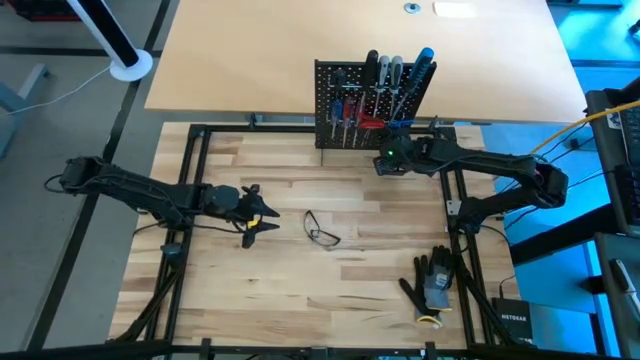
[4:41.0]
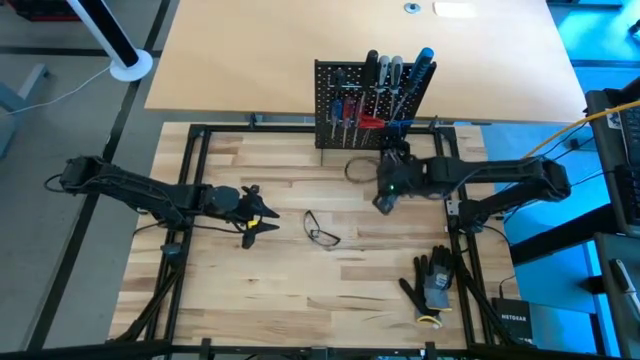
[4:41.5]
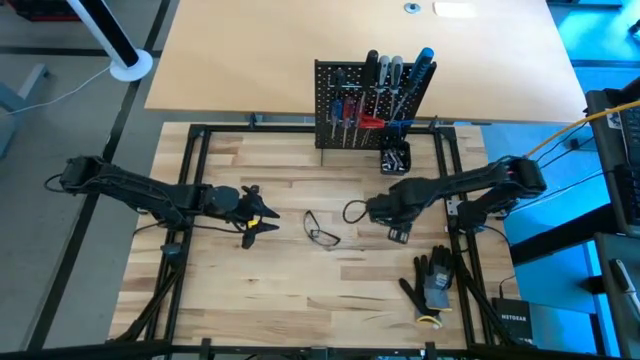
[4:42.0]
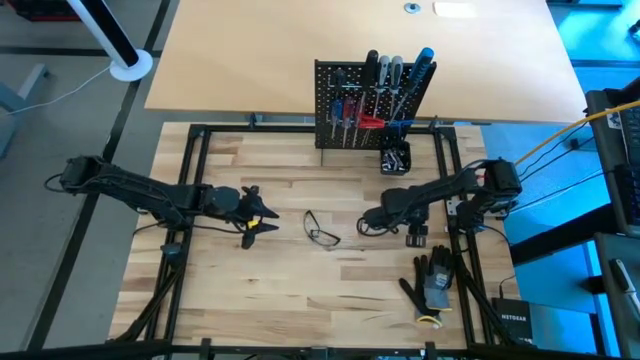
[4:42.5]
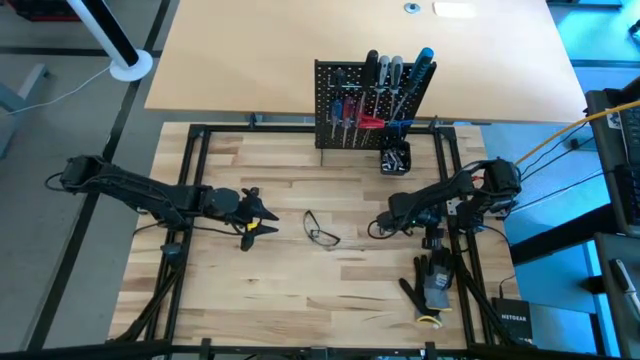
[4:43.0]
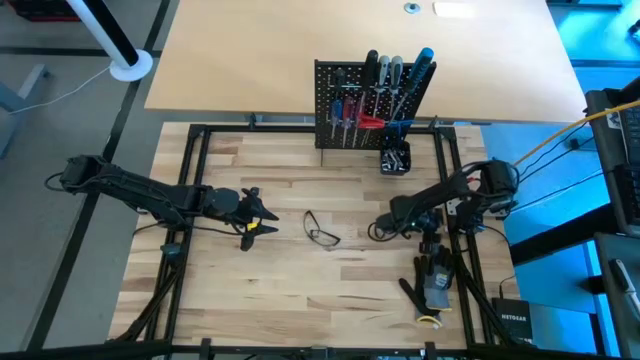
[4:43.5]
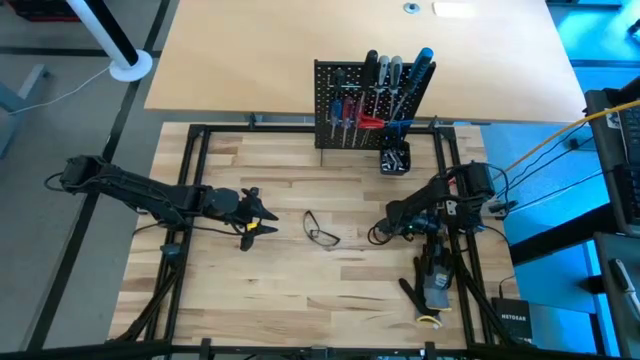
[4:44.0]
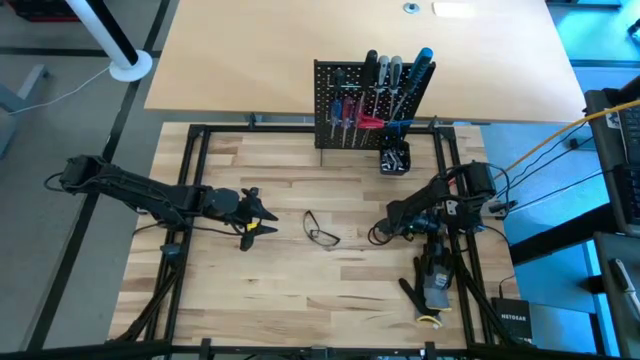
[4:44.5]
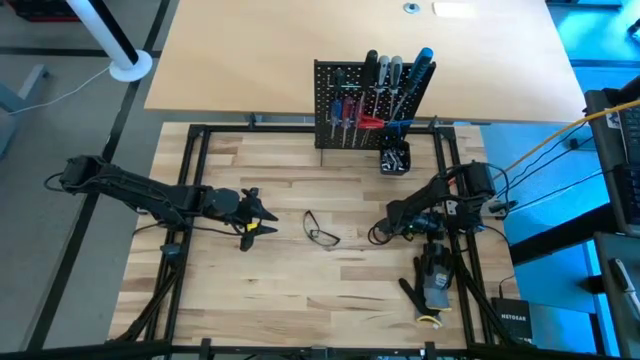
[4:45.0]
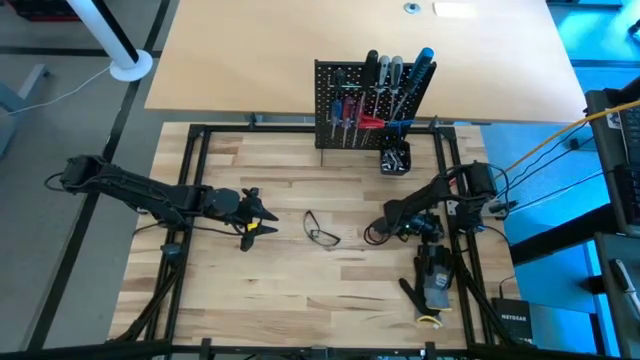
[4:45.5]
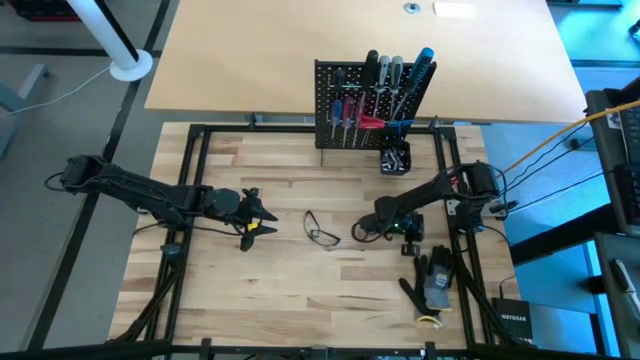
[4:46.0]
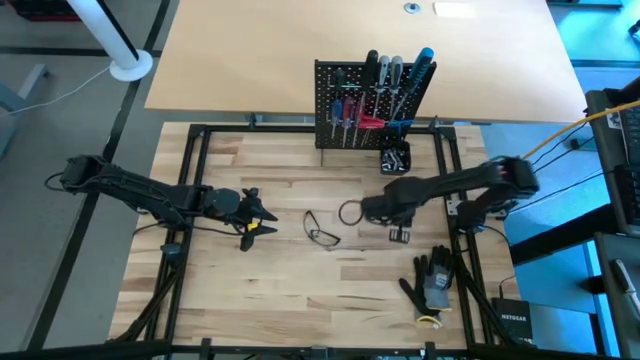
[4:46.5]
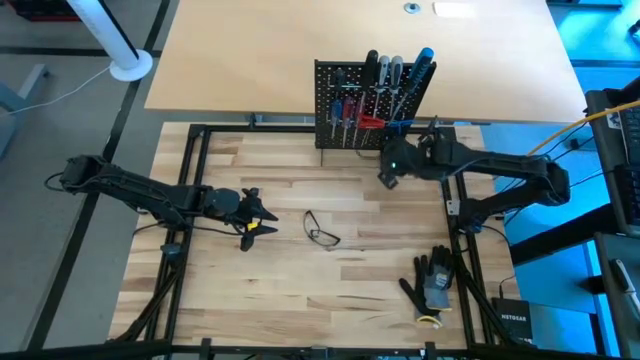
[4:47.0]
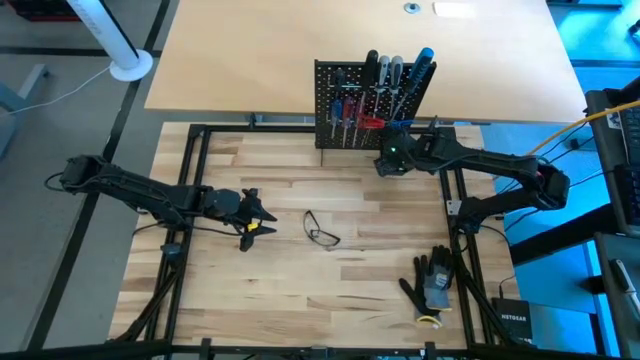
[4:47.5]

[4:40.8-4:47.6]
Task: Hang tools onto peg board
Put the silver socket in the black bin on the peg board

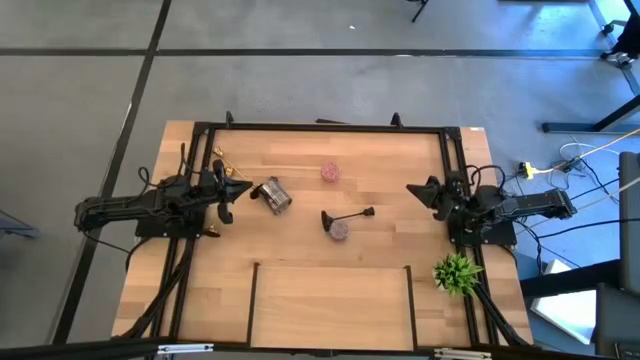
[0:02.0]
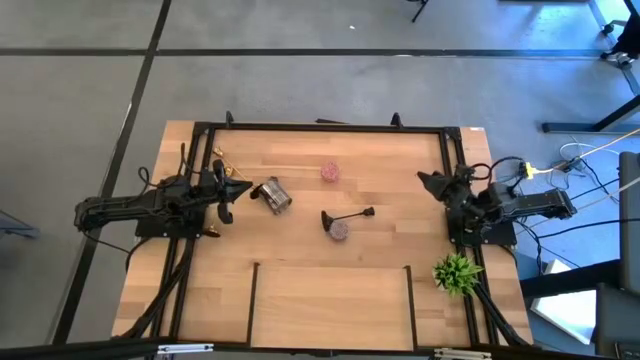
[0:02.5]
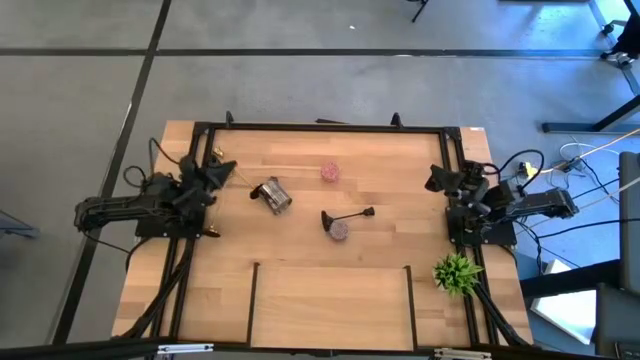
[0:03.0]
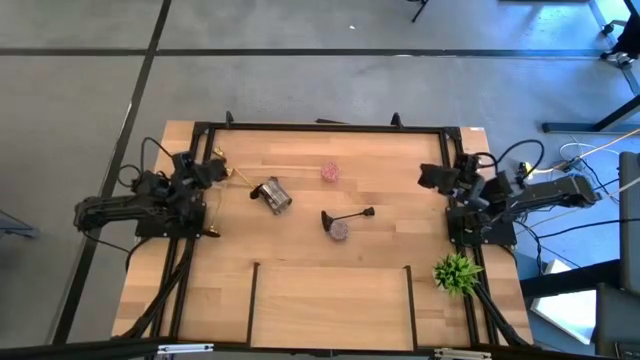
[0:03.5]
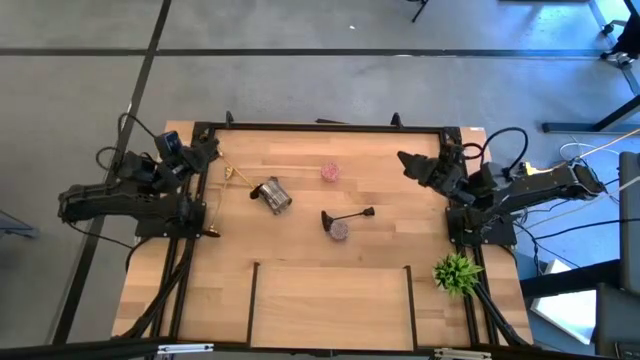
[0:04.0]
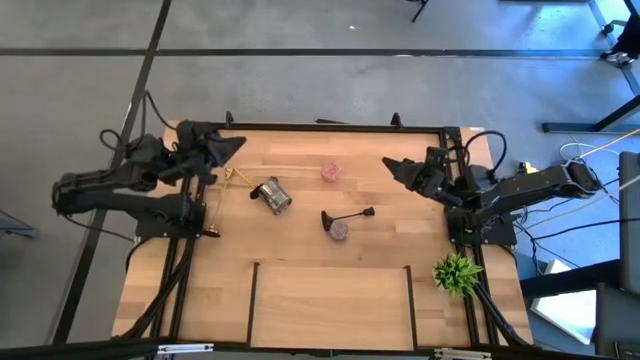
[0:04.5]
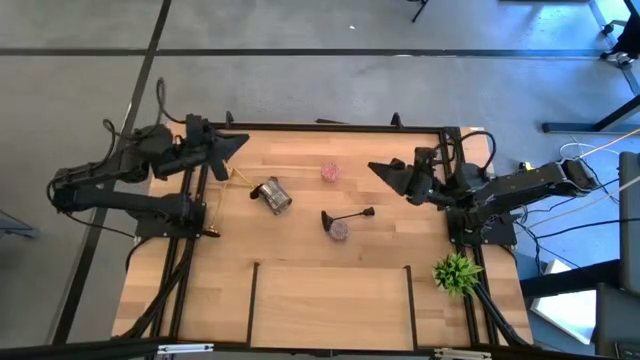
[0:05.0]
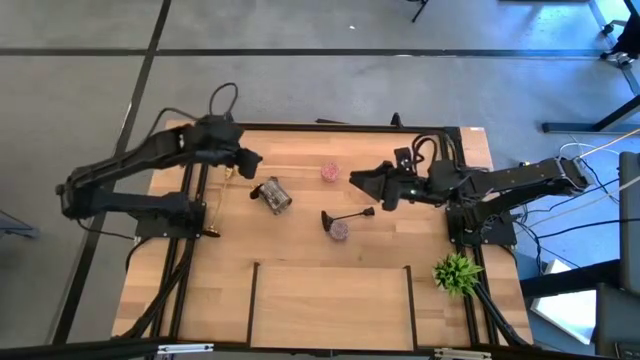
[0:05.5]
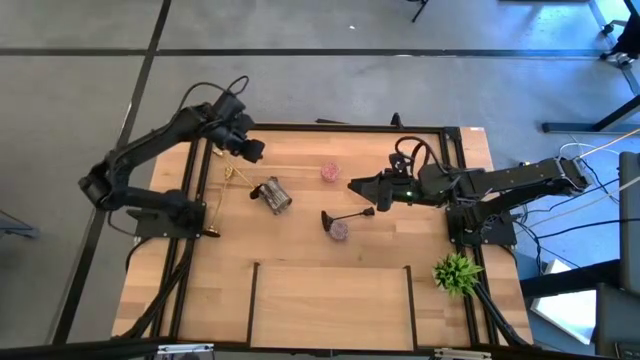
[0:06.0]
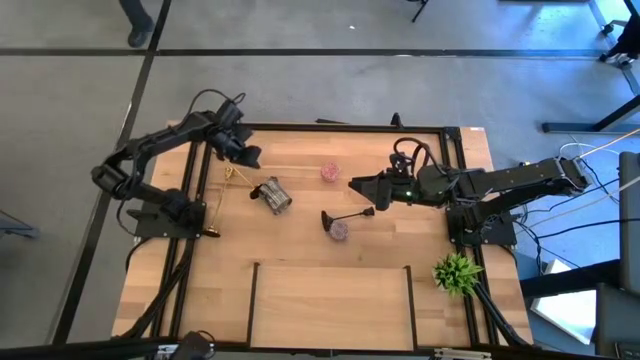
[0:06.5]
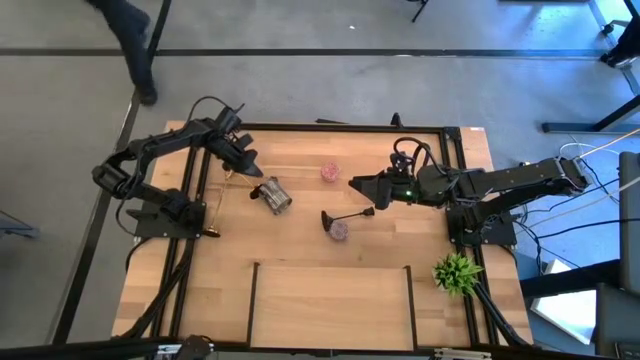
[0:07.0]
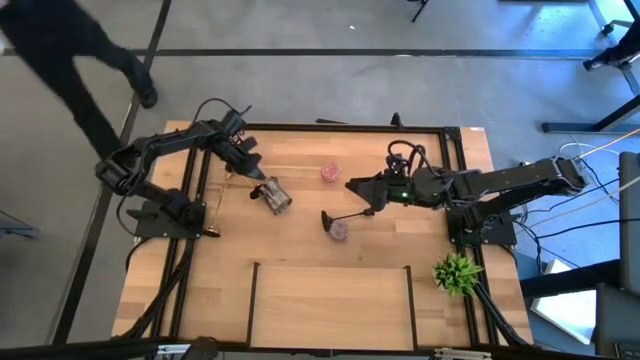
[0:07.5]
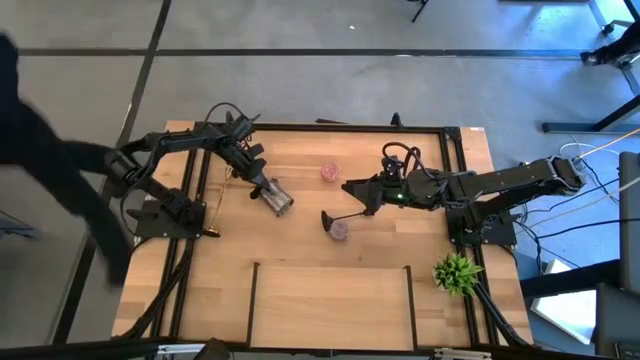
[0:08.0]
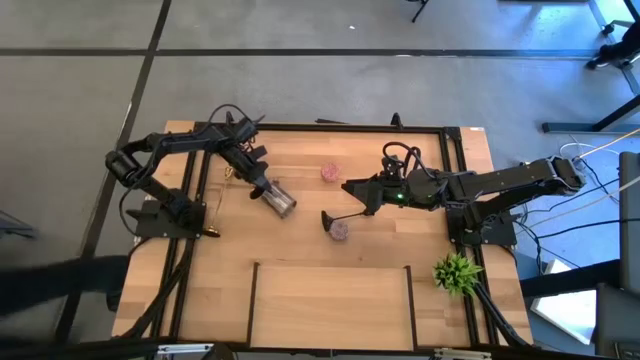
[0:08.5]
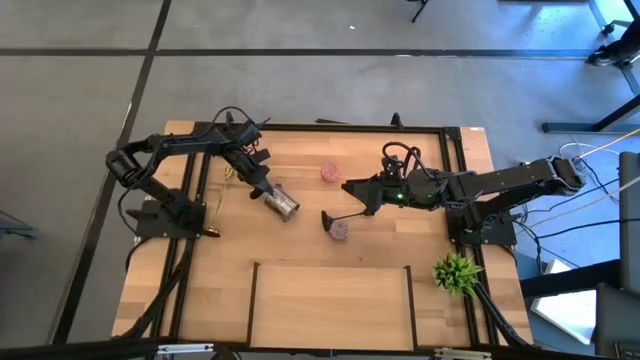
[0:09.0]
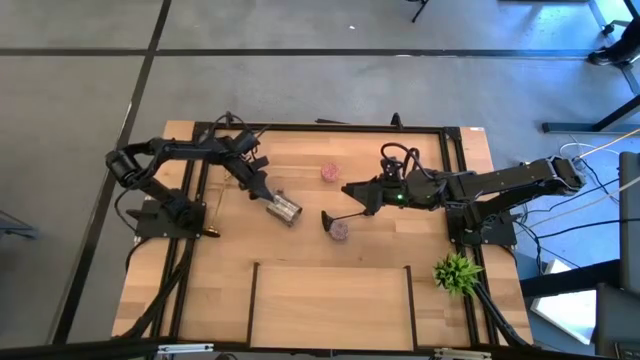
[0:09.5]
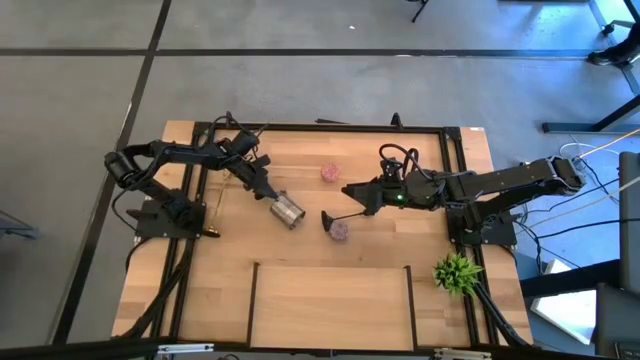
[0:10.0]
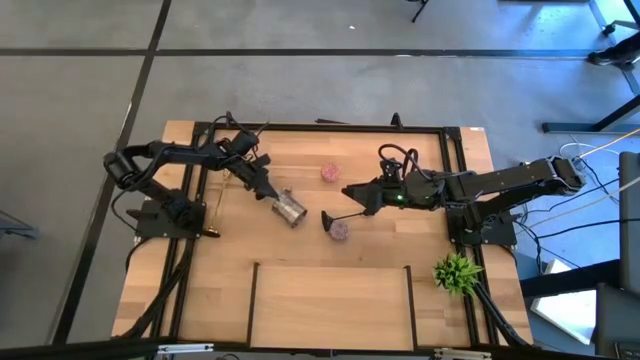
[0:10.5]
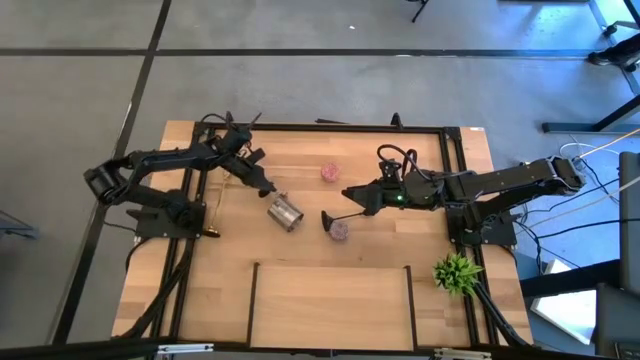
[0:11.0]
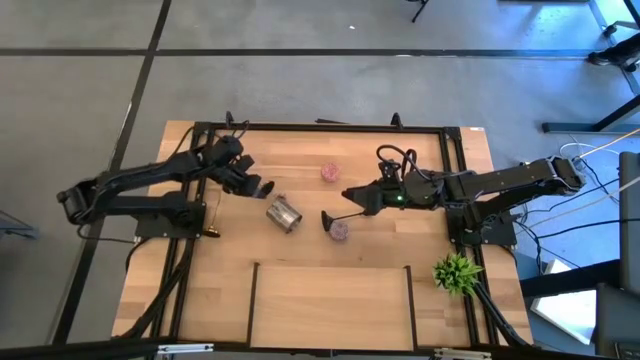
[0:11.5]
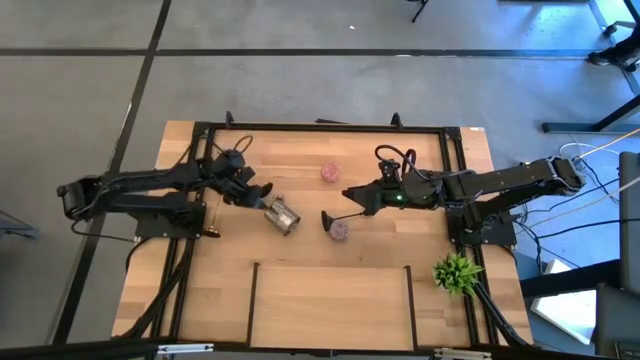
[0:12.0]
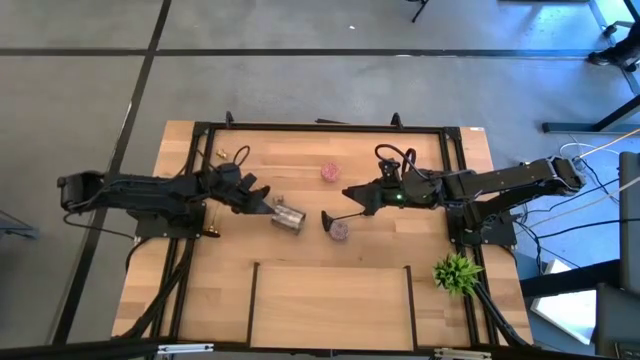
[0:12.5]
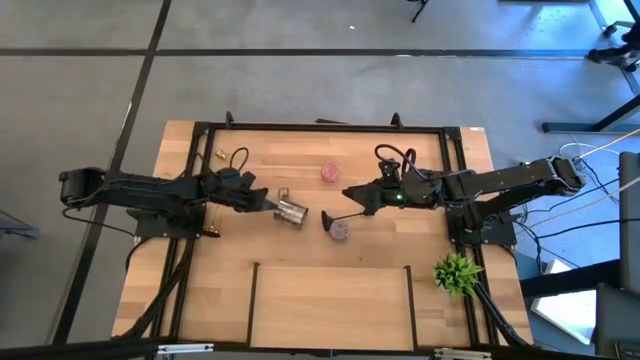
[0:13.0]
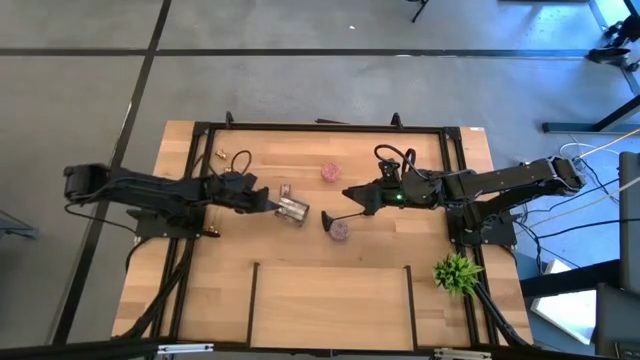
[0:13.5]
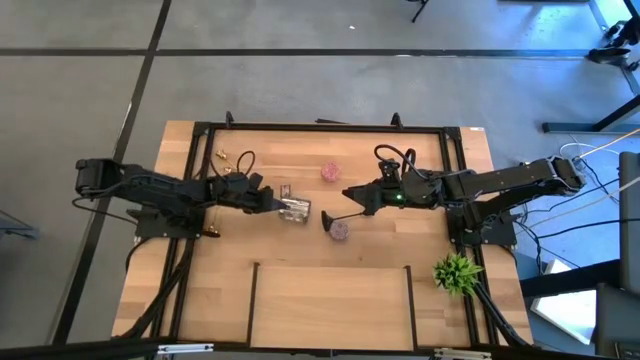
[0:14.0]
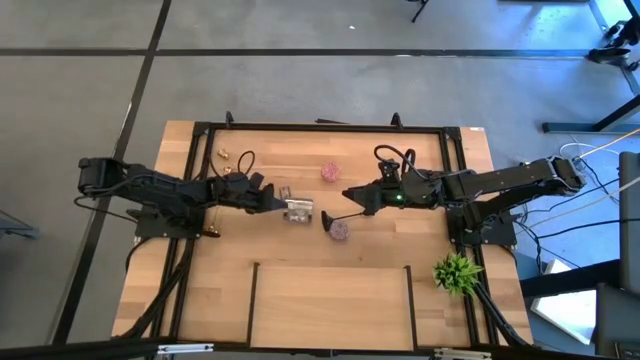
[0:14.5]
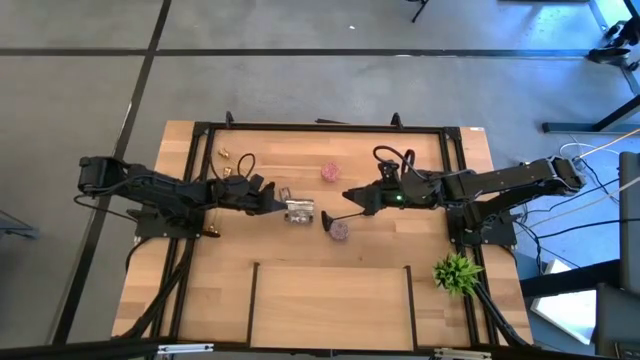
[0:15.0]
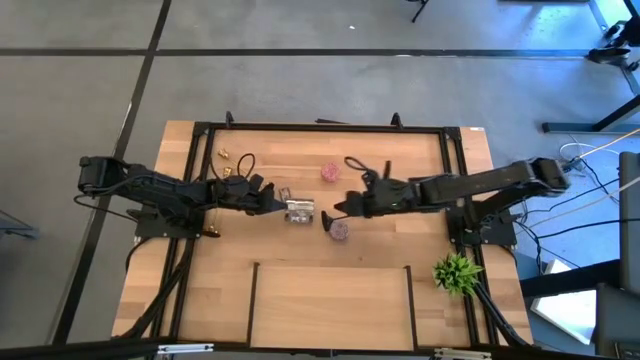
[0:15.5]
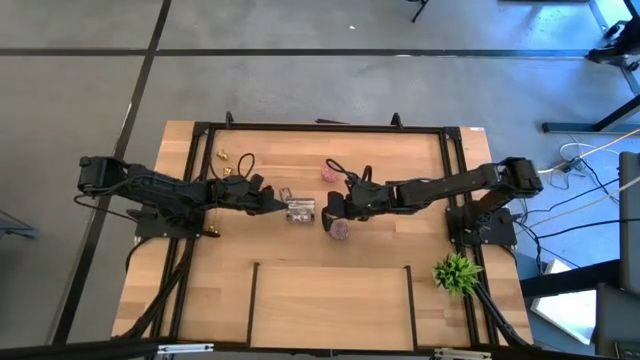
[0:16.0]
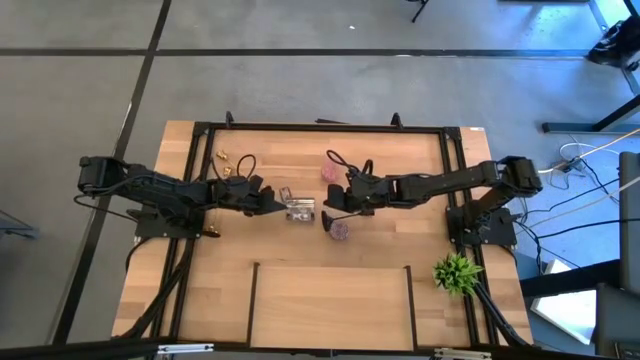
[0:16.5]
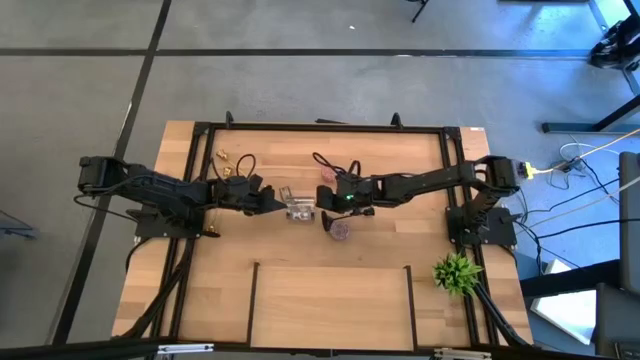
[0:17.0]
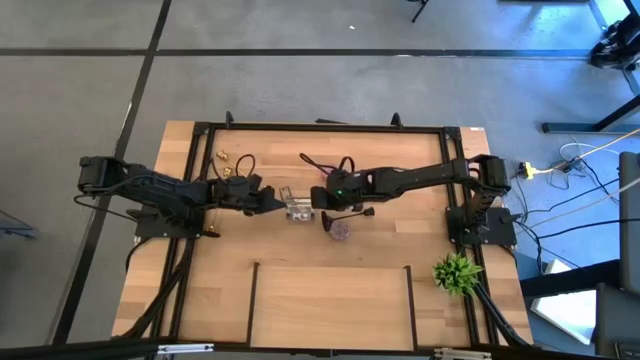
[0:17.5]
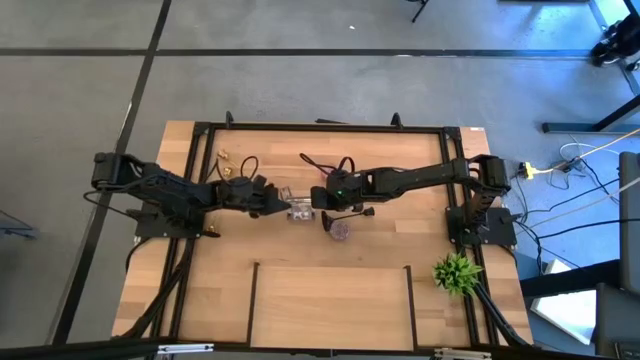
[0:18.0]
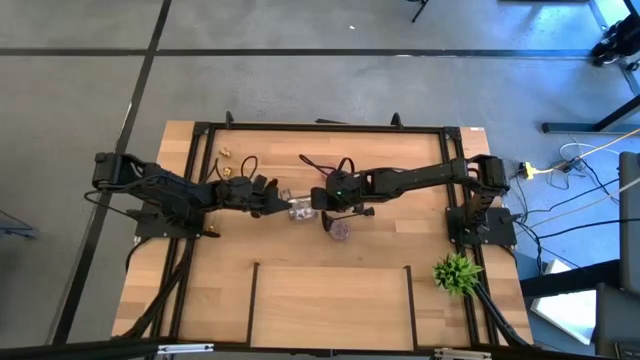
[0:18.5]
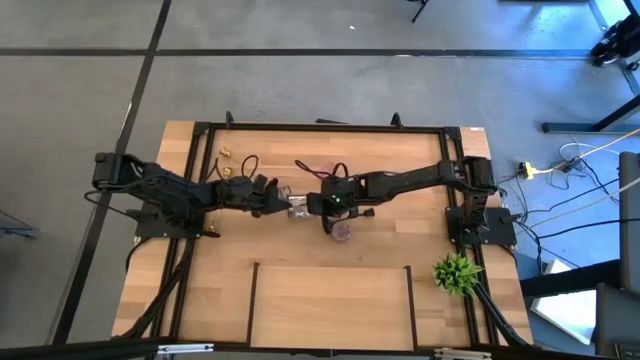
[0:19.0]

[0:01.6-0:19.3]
Task: Pick & Place candle stick holders
Put the silver scented candle on the shelf
